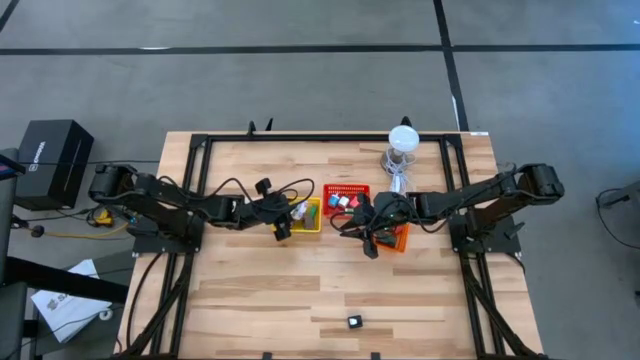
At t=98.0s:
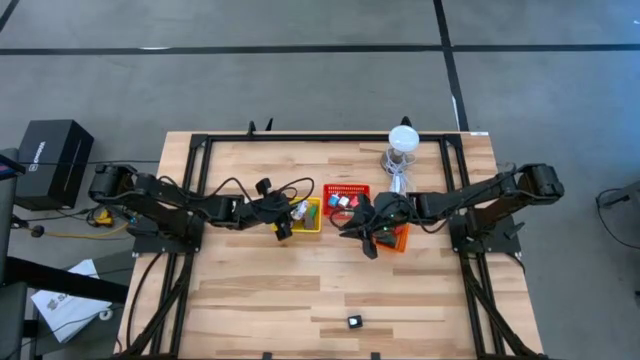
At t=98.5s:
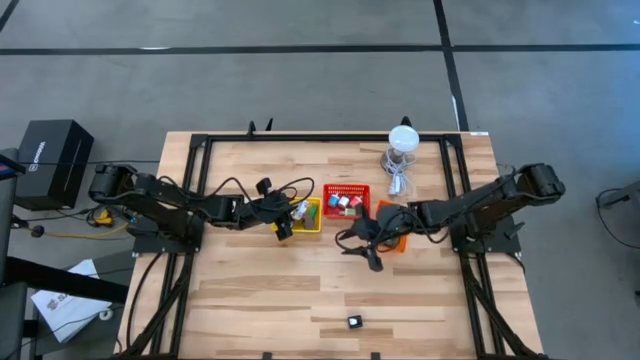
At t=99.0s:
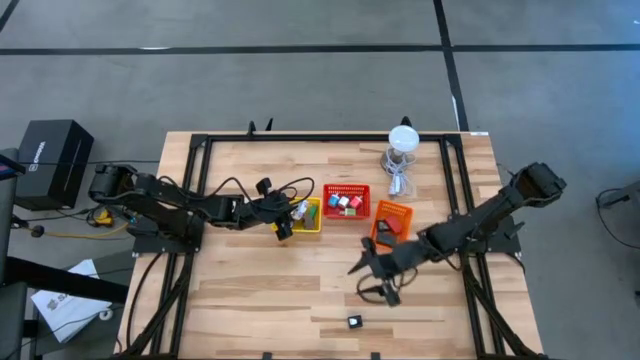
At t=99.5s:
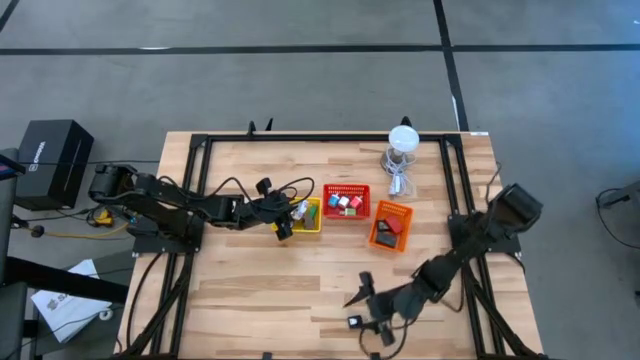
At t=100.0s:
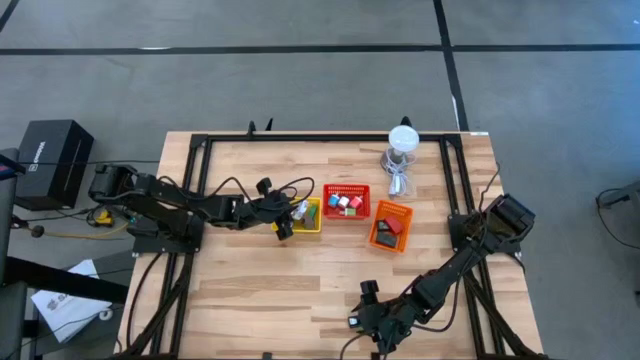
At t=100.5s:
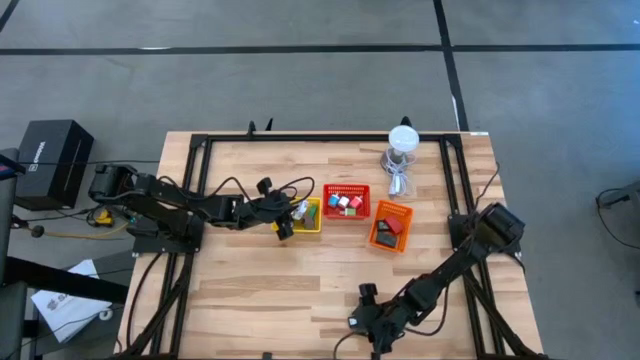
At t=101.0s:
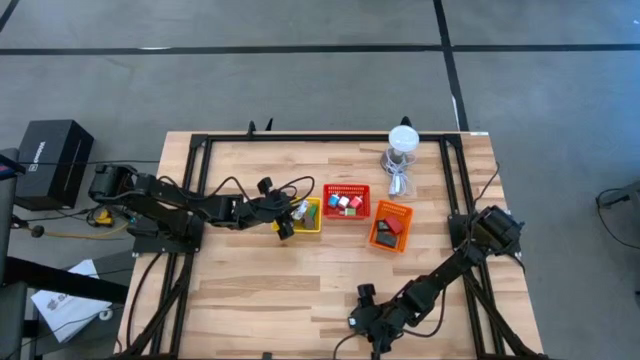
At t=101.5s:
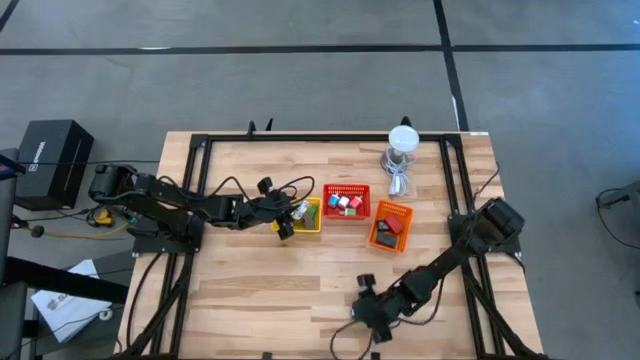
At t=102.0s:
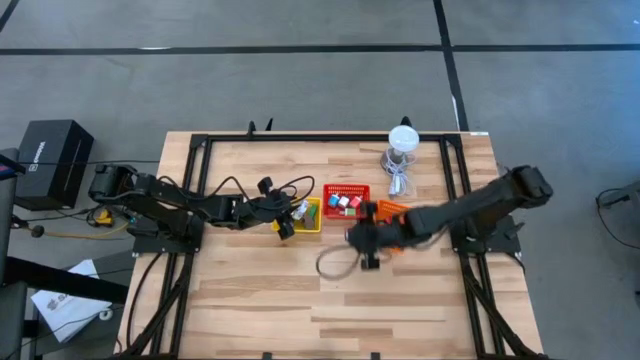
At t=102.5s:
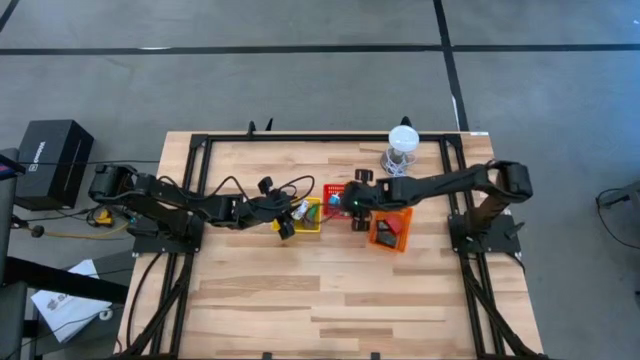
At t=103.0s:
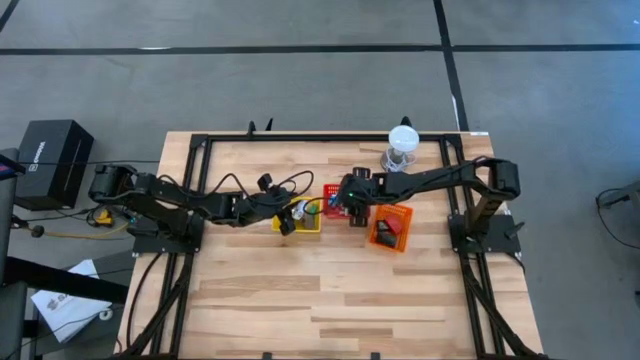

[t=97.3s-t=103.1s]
Task: Pick & Place Office items
Put the black charger adapter into the red bin

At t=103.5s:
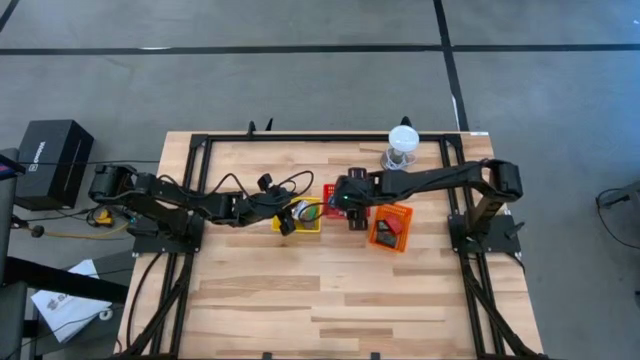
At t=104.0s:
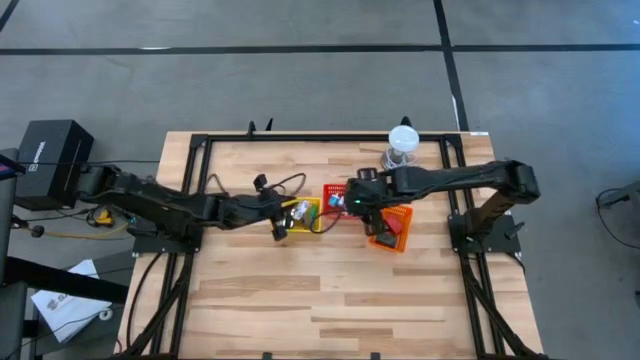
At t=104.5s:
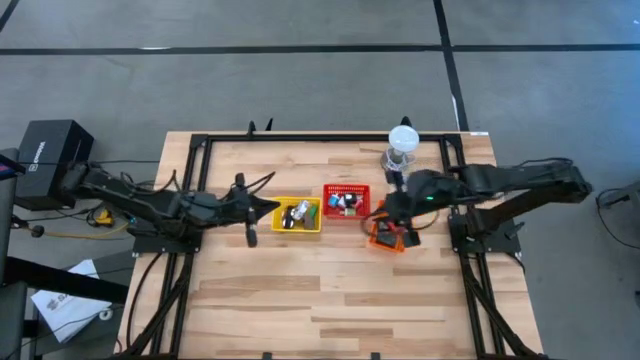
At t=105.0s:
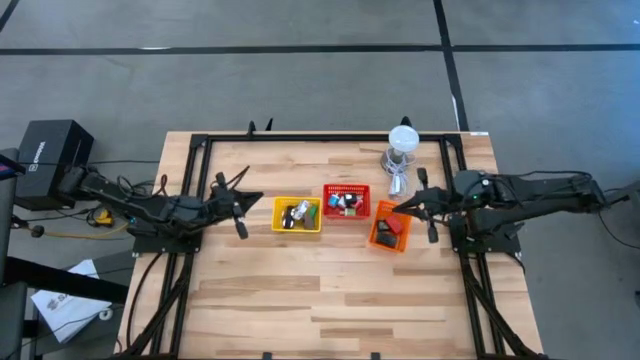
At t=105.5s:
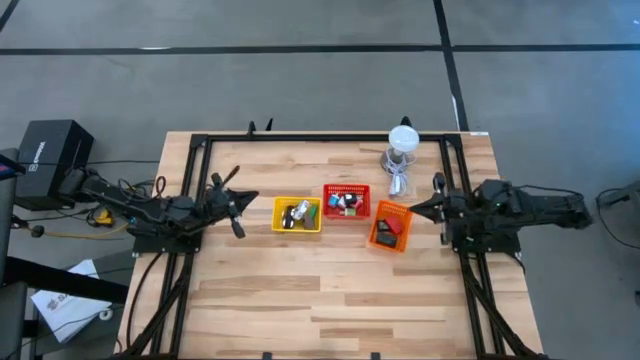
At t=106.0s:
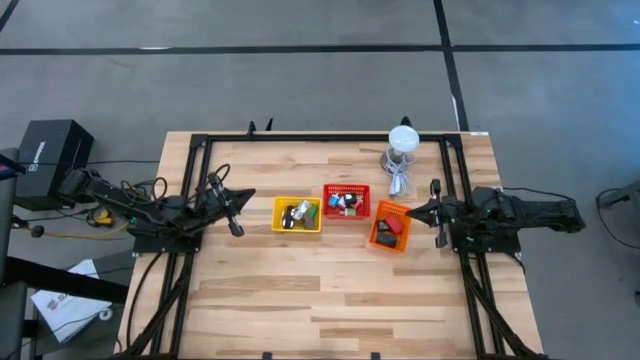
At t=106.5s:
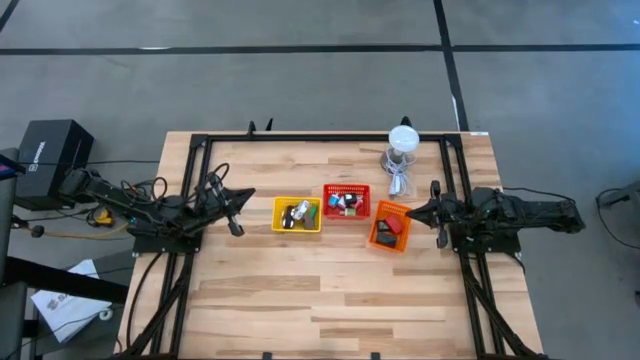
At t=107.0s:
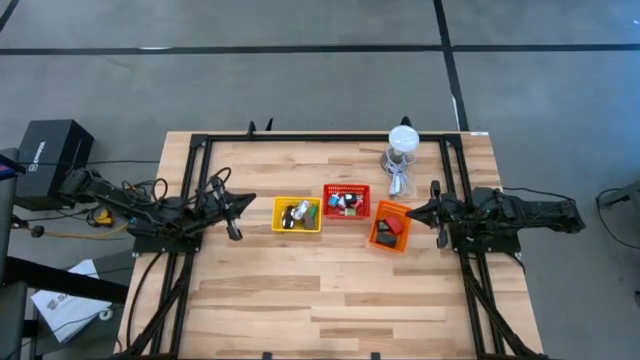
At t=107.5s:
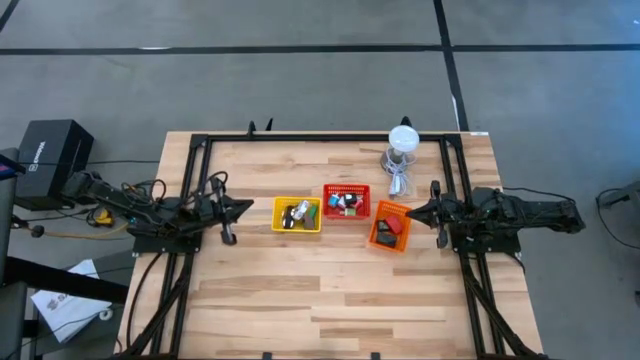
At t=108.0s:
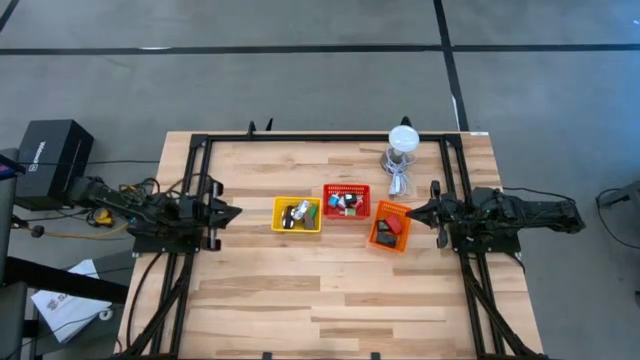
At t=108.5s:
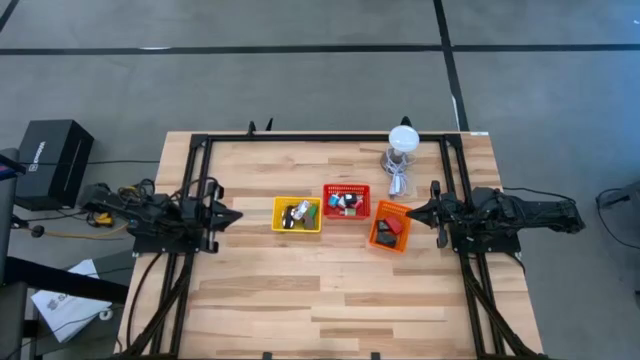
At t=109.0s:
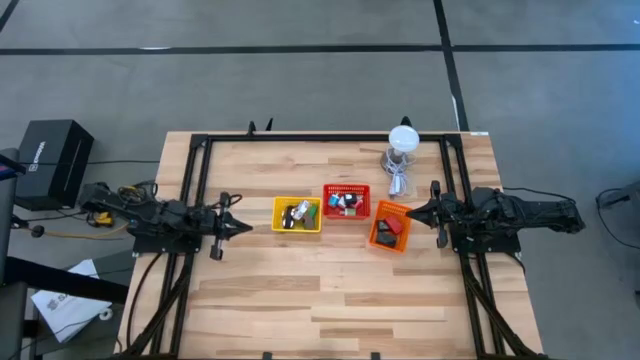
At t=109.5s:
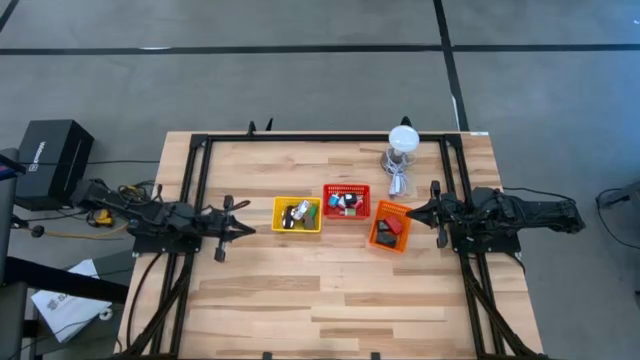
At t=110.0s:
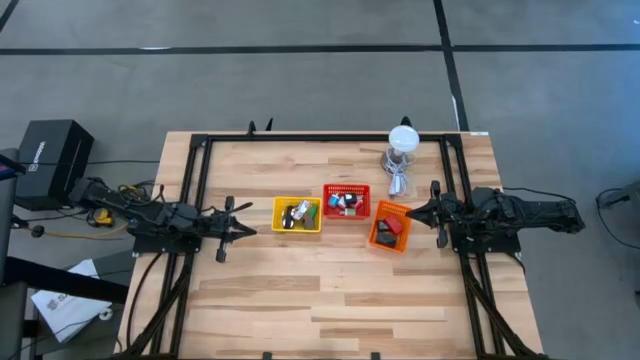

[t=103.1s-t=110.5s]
Return to Home Position

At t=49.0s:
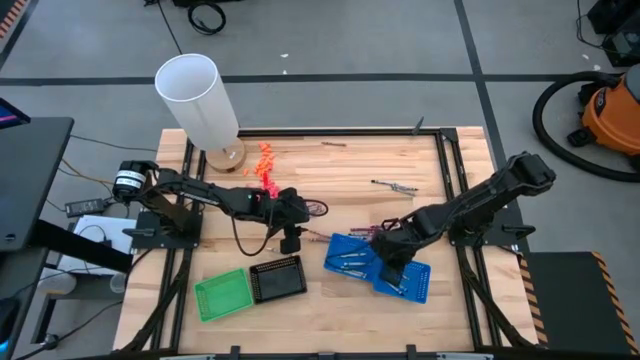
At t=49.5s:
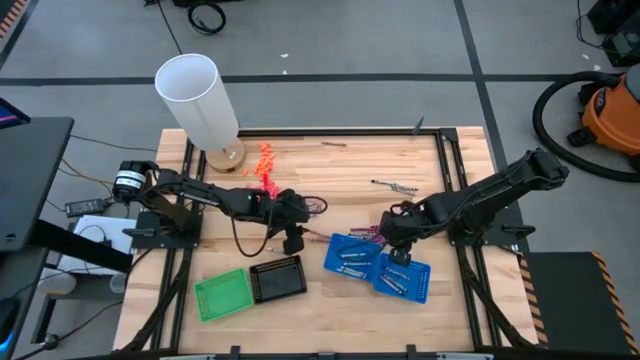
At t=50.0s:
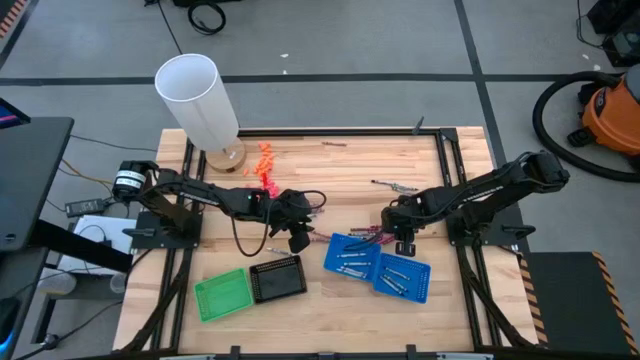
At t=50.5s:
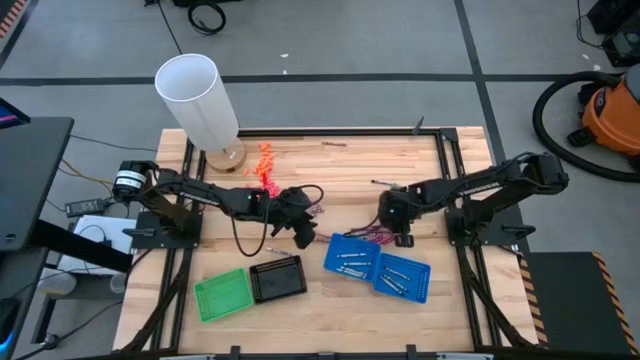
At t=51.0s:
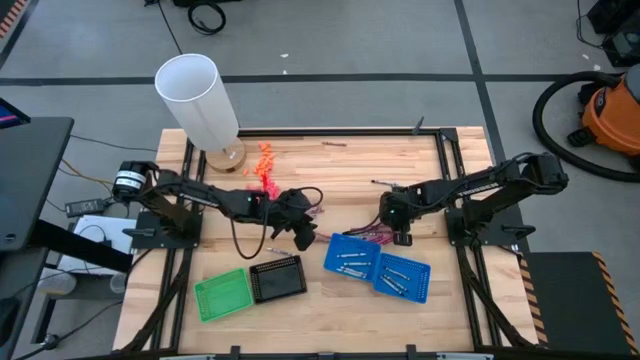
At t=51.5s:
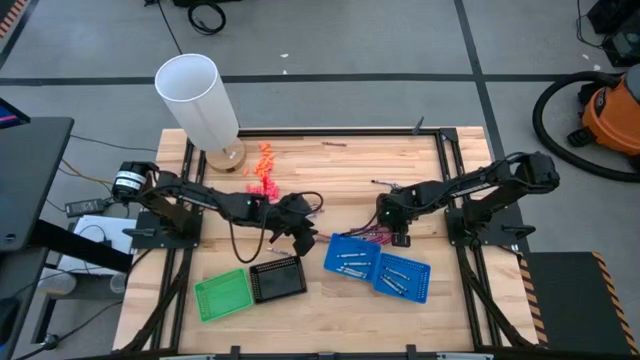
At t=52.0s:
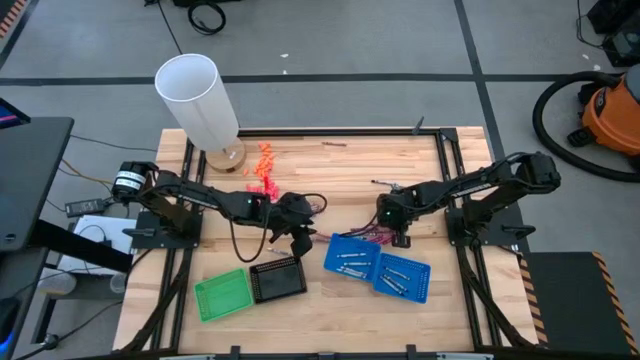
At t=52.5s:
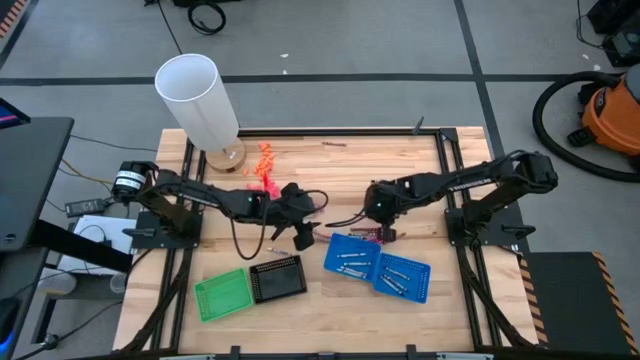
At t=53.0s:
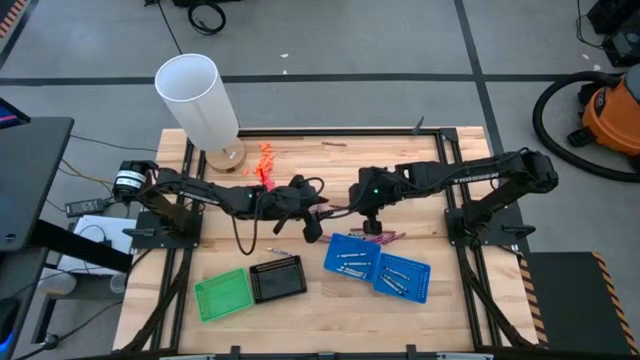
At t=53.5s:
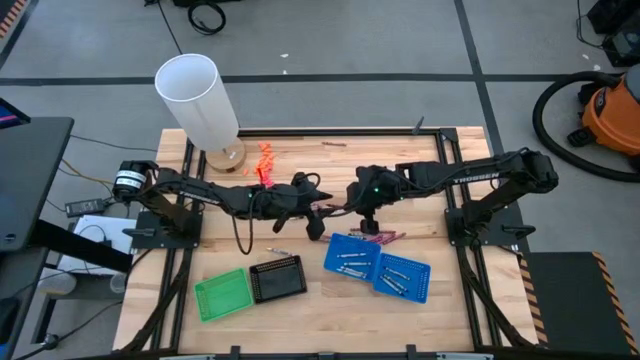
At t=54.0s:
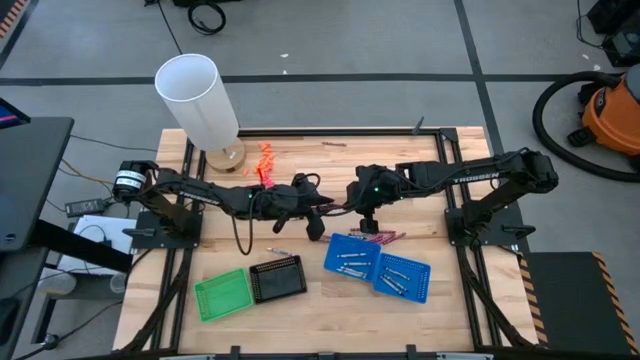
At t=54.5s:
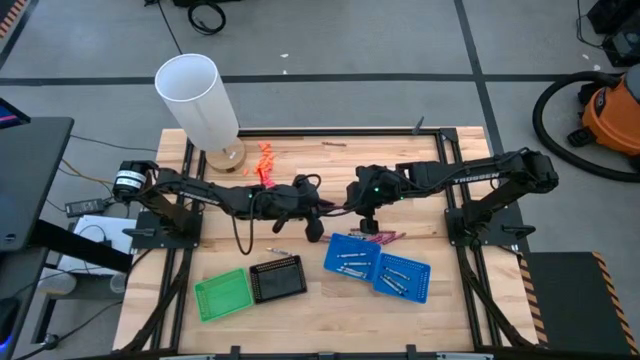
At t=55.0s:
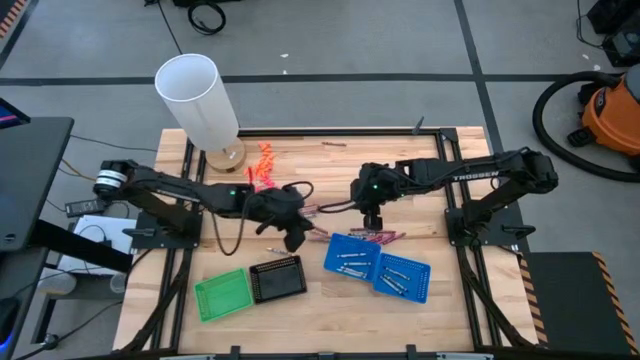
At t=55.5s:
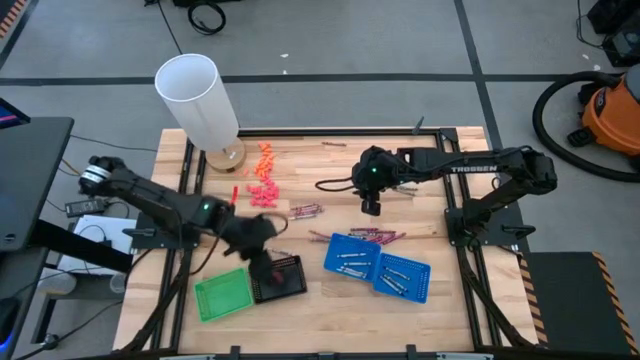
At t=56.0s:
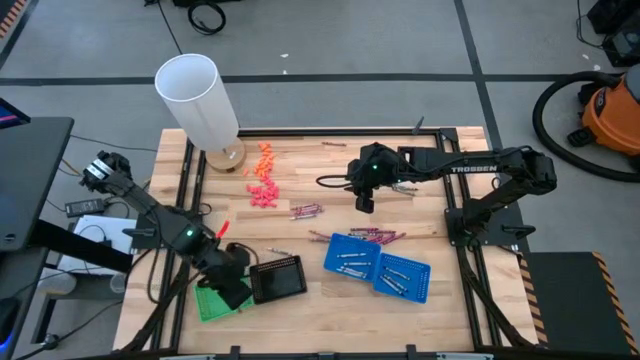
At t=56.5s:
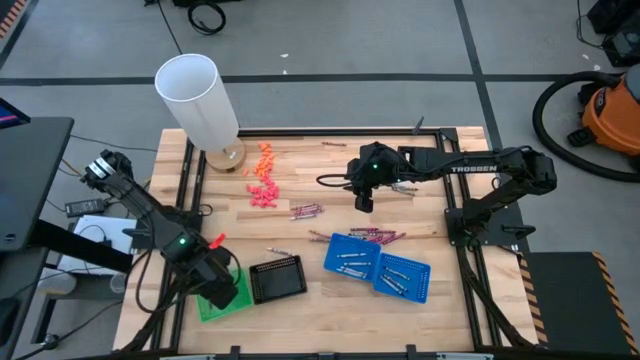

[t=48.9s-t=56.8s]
Task: Sort crayons
Put the red crayon into the green bin
